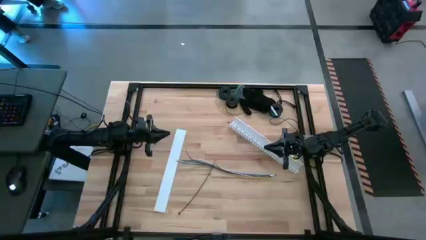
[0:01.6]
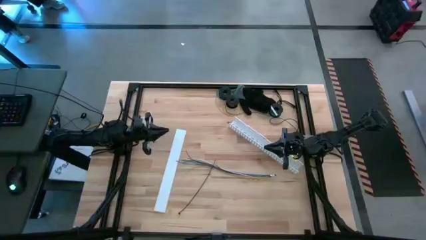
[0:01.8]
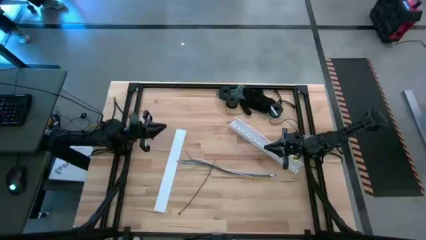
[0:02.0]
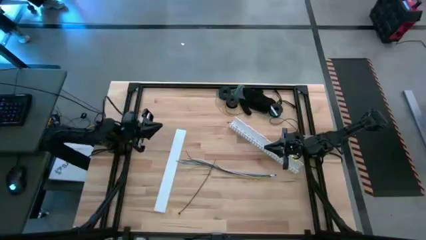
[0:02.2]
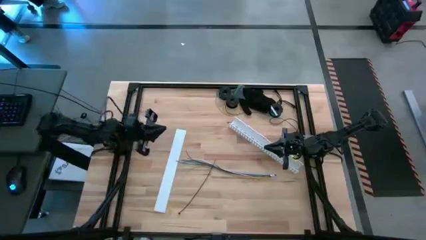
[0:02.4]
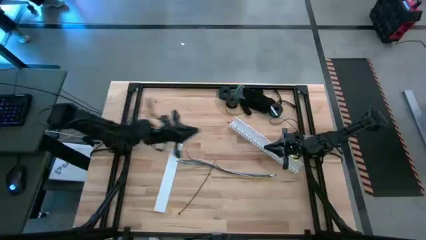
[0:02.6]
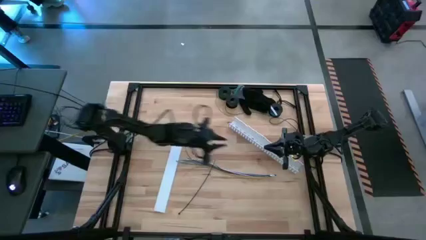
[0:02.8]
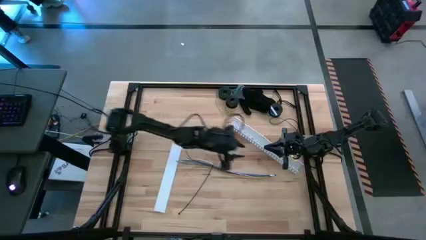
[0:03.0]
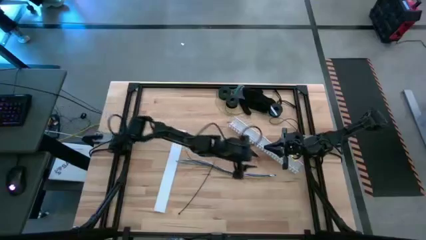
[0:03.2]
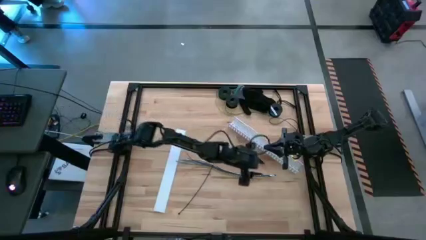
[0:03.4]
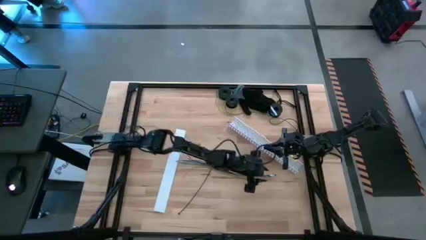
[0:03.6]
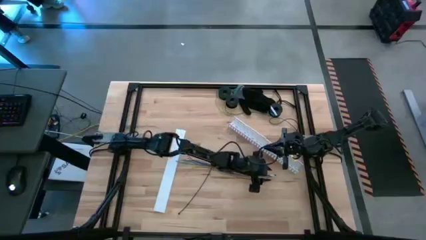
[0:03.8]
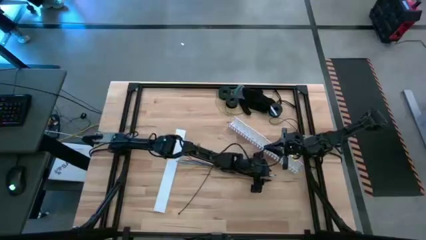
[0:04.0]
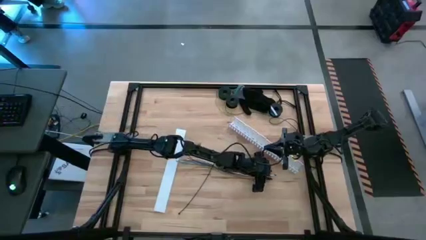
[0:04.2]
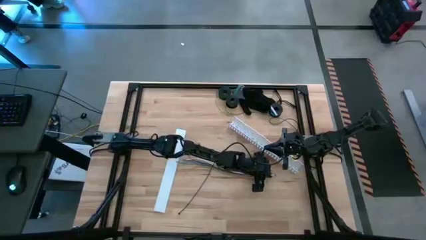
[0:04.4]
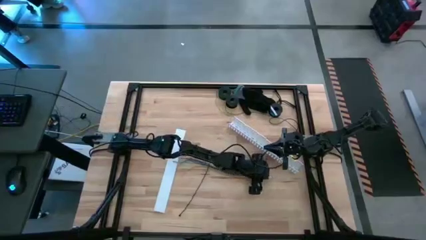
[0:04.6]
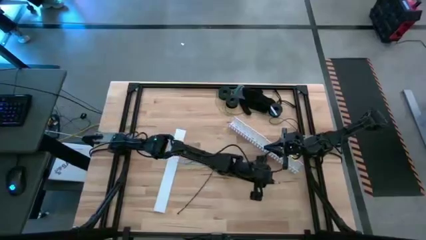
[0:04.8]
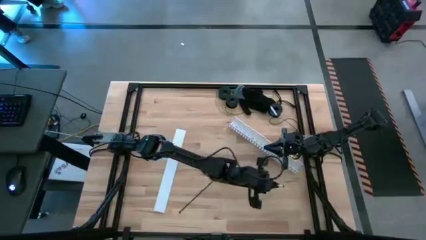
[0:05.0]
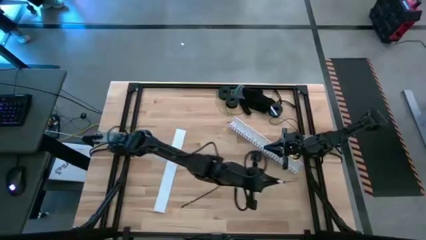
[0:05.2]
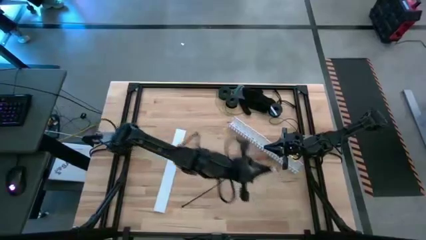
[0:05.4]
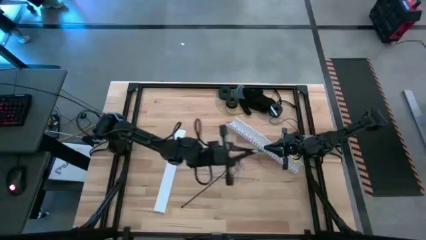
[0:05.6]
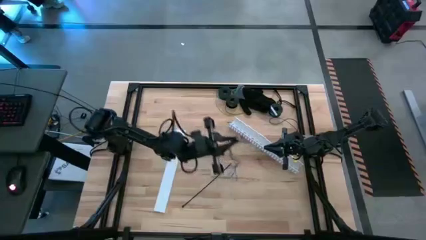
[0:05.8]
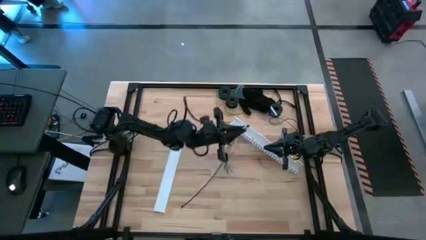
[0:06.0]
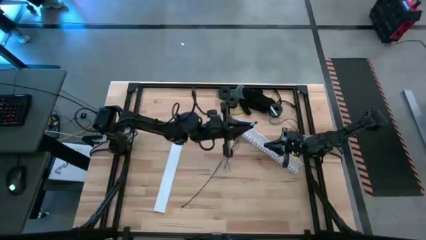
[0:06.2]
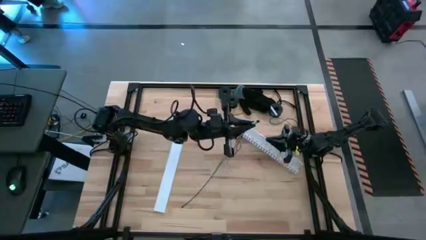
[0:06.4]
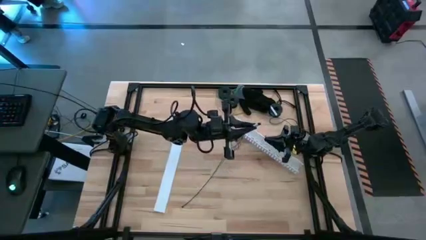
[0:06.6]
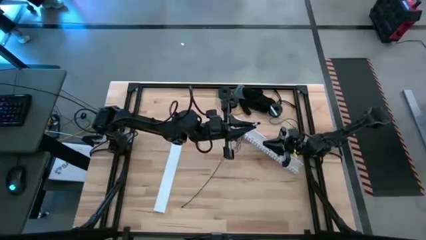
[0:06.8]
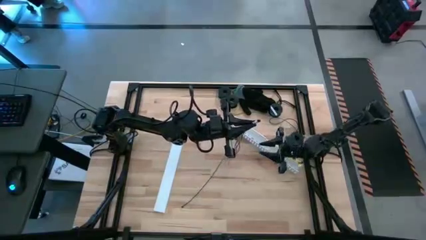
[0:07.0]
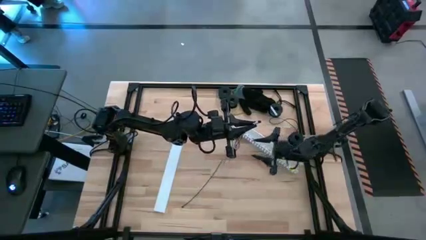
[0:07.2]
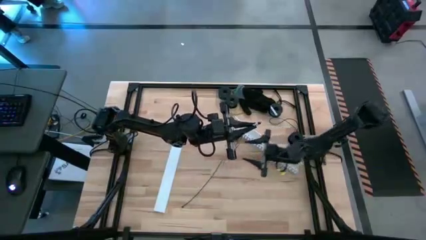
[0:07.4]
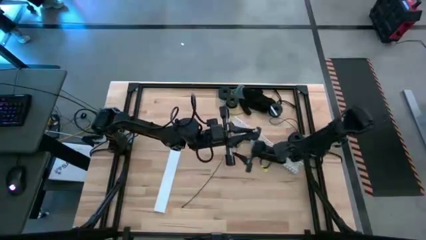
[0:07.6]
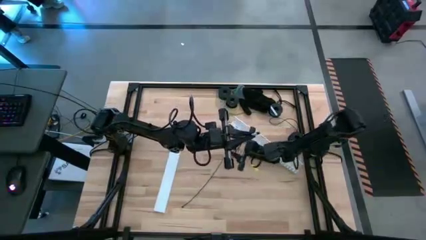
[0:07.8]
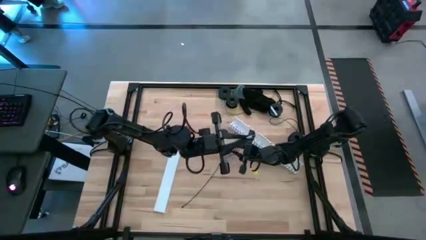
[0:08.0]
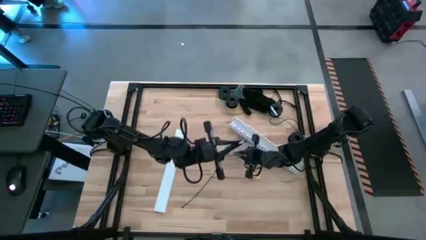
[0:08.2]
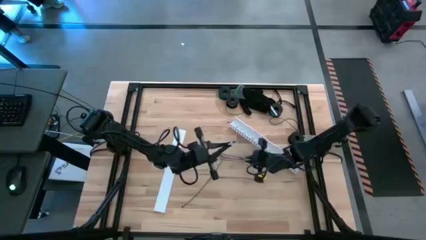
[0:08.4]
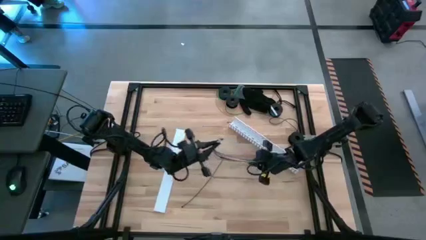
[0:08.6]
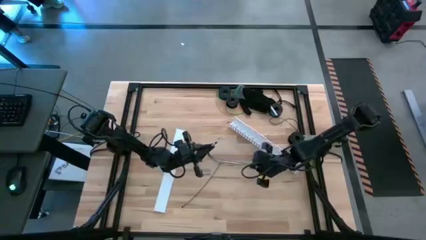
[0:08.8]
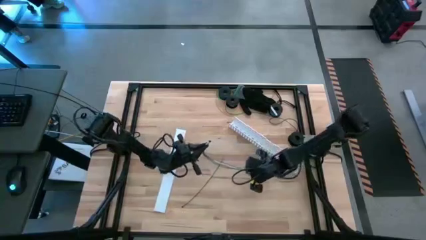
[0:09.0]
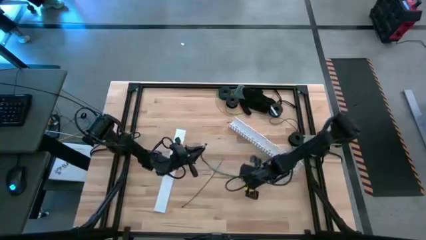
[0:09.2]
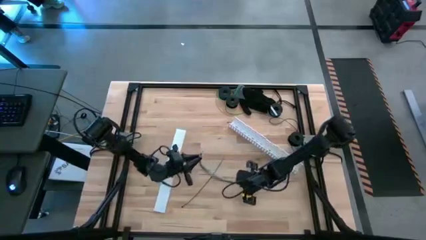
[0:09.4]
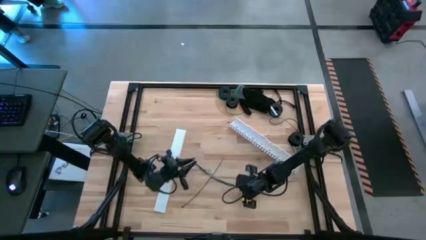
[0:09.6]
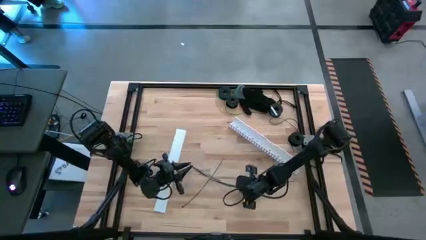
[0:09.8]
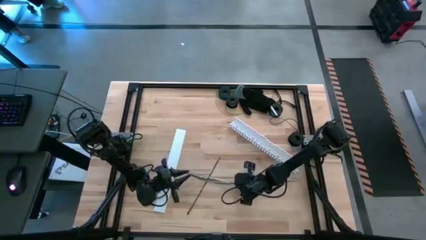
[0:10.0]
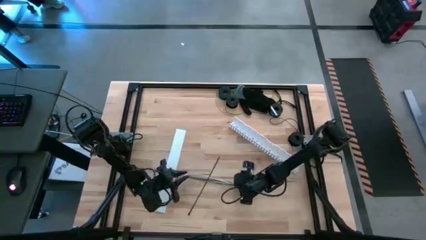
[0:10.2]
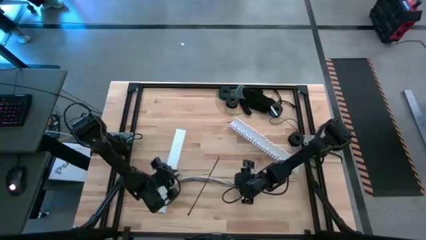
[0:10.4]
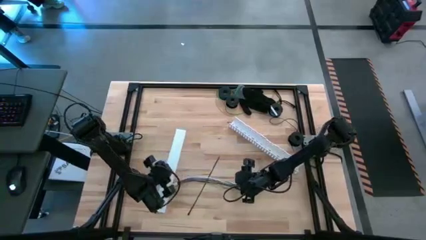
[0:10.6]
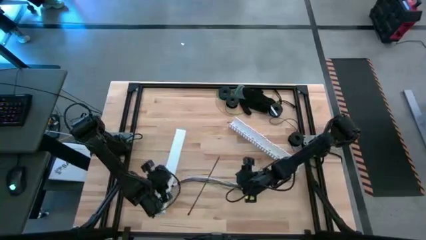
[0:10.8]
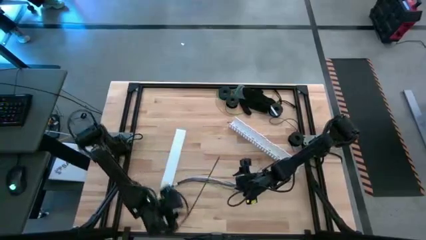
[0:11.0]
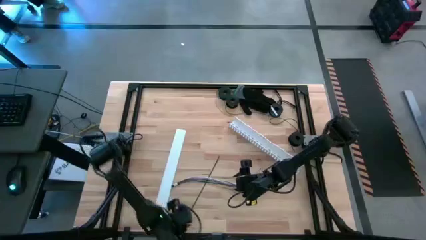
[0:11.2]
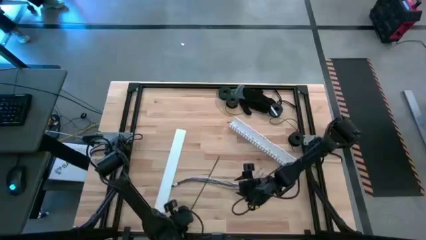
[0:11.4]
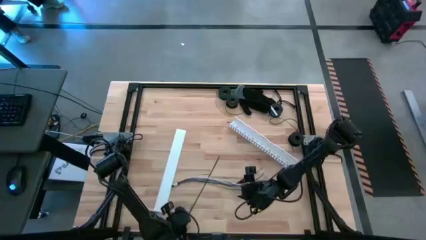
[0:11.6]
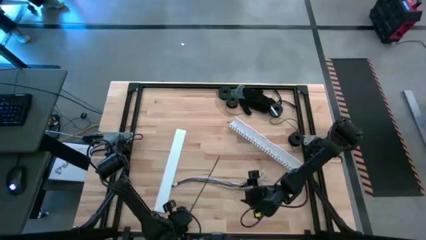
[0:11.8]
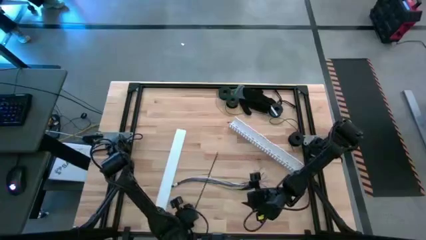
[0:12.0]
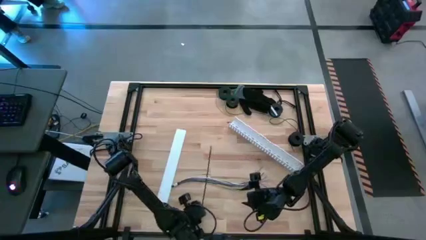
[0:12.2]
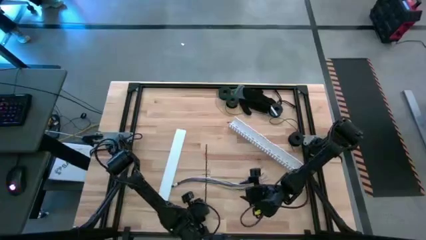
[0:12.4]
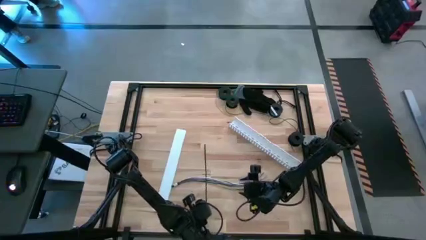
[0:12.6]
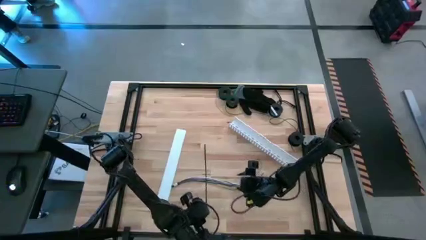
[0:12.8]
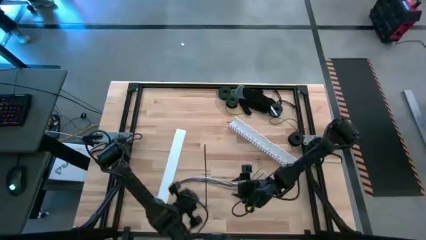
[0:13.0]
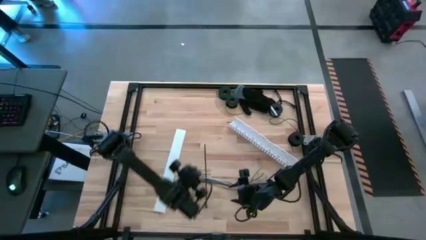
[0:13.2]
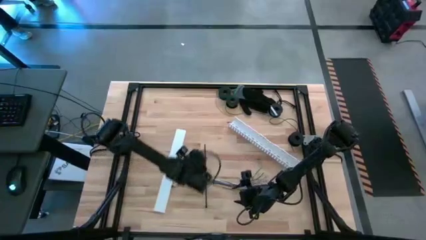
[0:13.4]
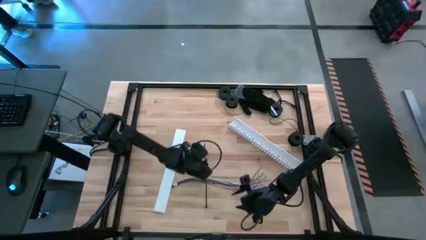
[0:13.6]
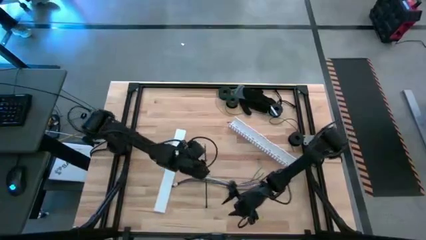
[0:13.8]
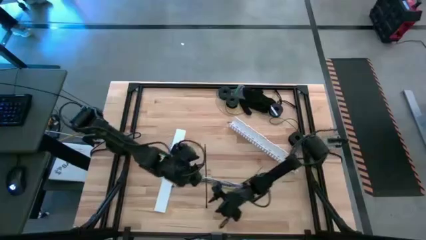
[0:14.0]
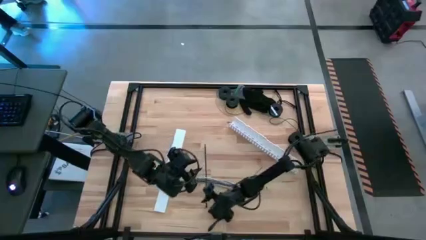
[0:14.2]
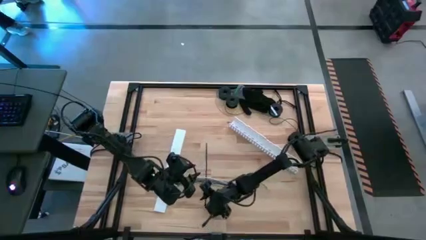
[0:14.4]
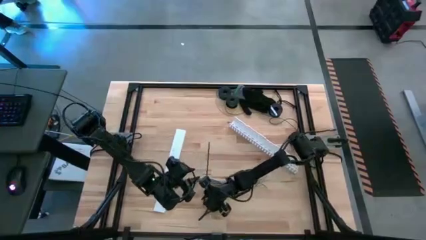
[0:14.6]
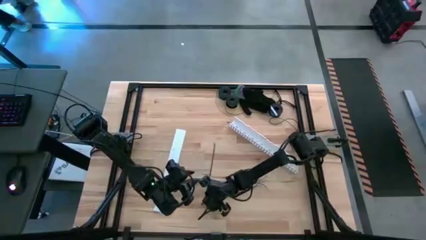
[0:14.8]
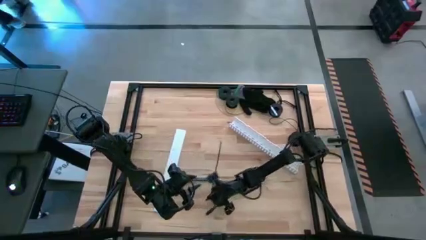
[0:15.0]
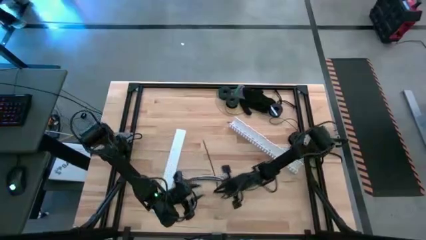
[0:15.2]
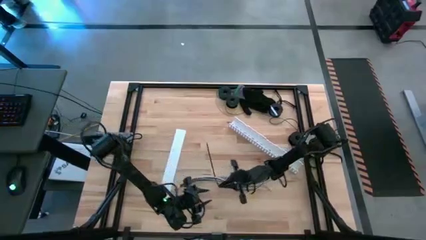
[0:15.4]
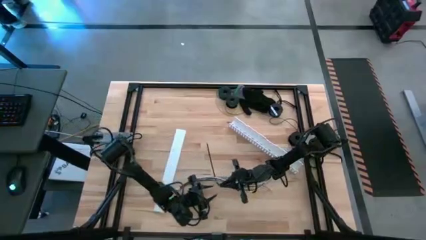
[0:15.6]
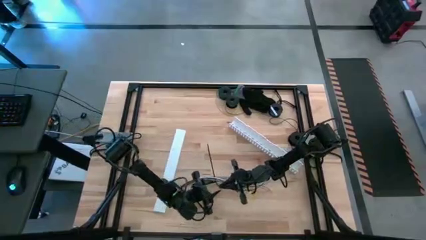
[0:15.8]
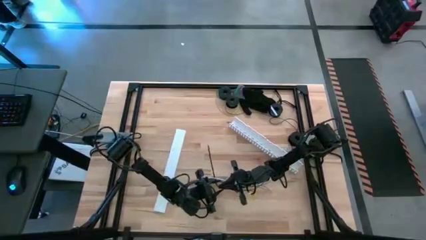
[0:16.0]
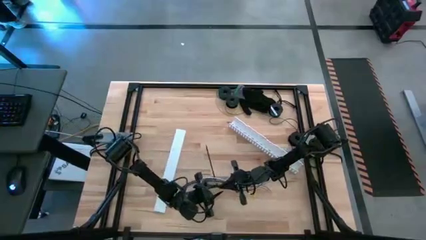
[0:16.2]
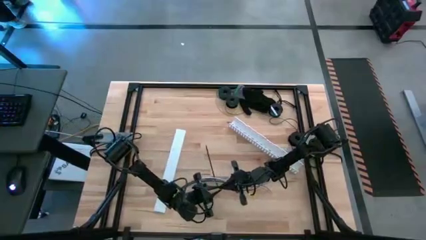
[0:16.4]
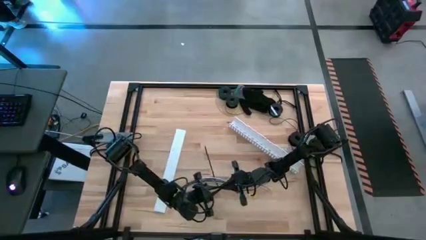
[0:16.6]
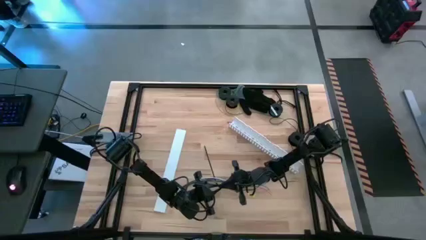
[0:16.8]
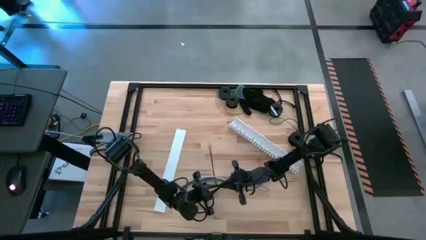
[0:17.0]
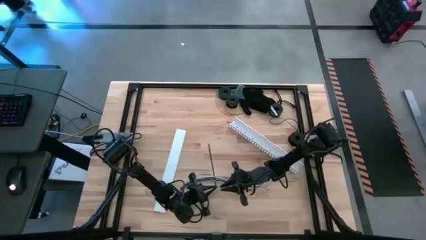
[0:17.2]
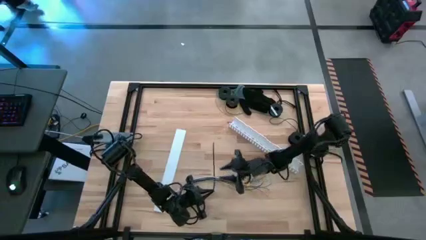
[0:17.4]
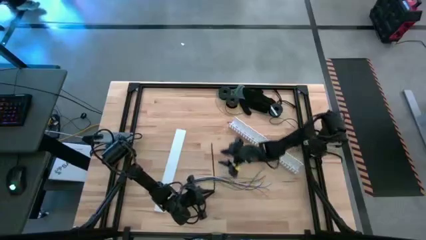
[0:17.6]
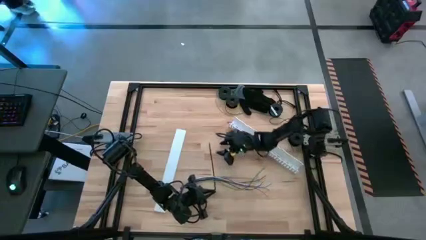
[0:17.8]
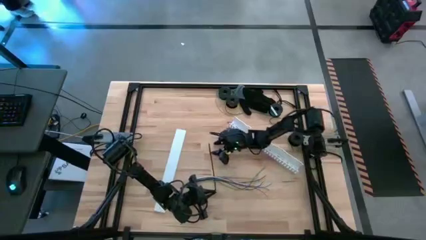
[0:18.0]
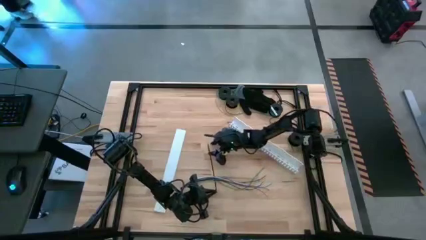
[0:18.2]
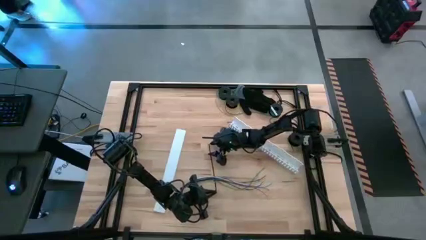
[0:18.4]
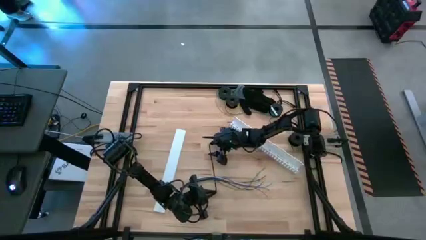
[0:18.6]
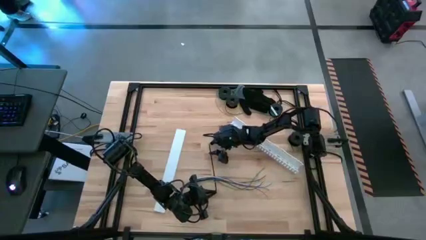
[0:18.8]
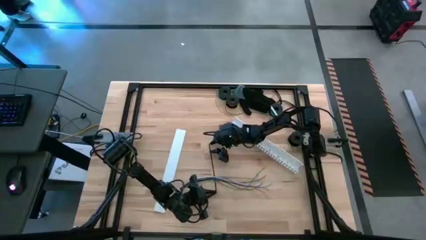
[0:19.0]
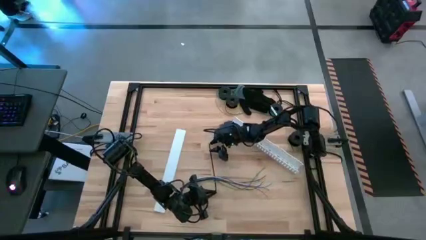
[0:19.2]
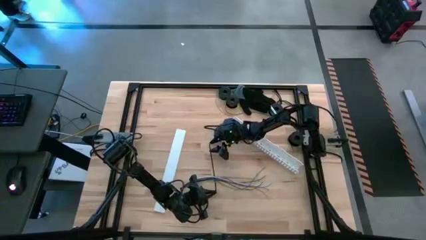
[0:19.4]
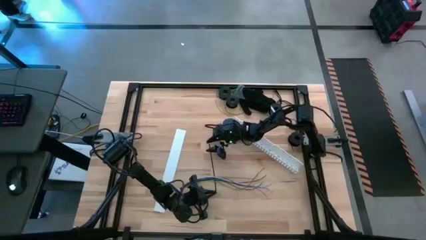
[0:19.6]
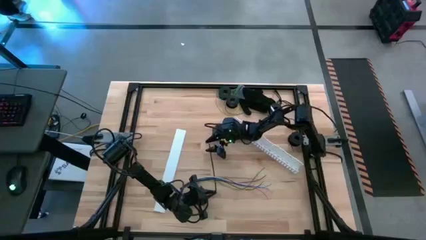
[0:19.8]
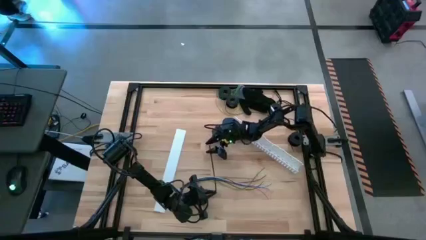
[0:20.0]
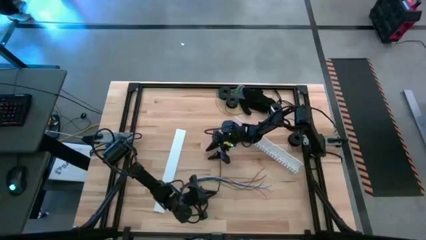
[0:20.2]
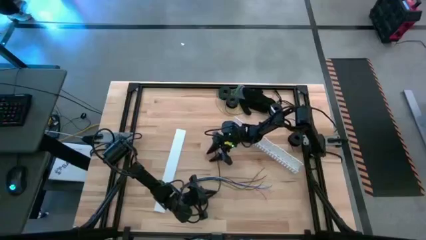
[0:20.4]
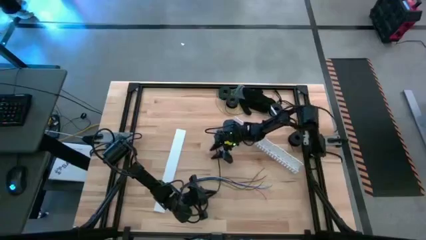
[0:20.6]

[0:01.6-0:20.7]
Task: Ziptie cables
Wrap the cable using zip tie
